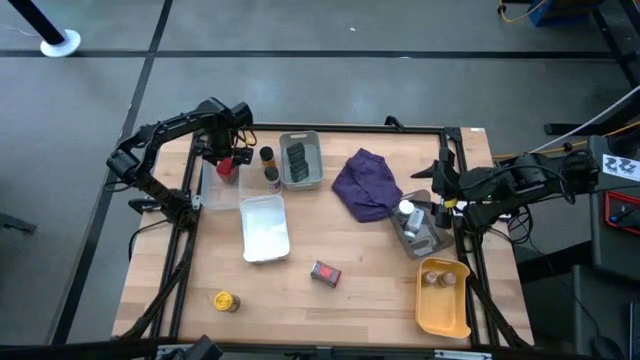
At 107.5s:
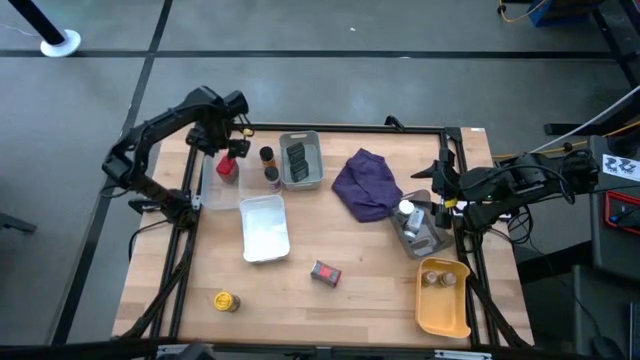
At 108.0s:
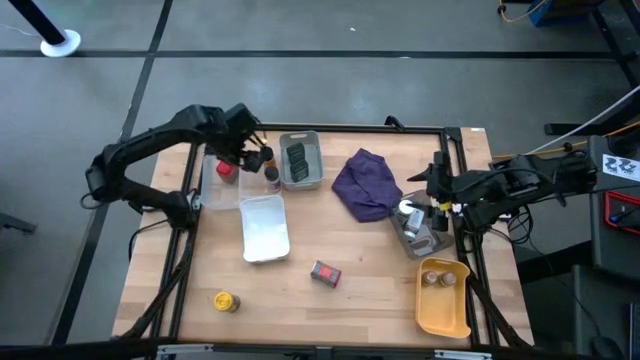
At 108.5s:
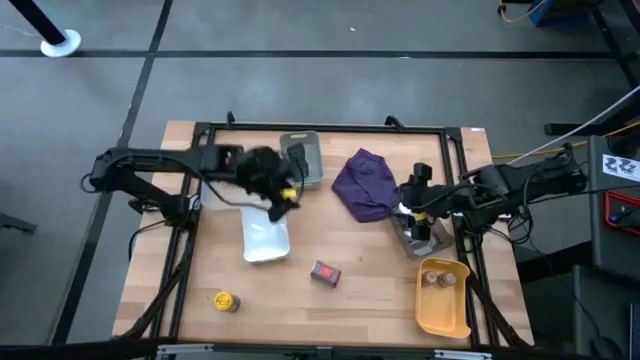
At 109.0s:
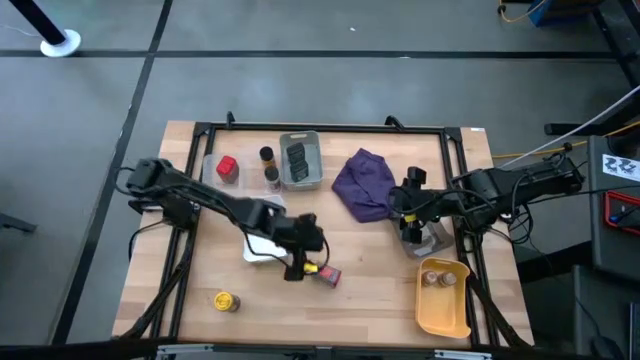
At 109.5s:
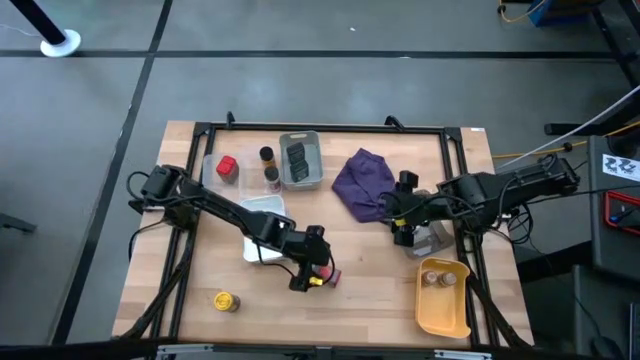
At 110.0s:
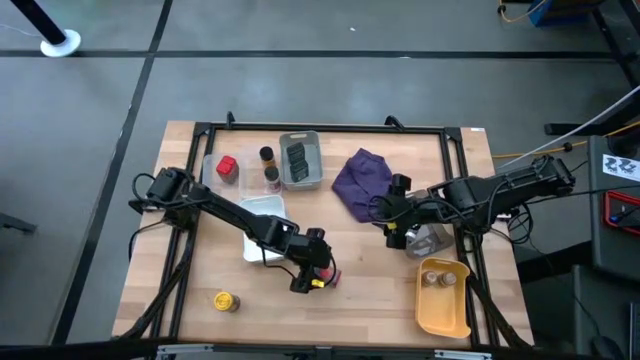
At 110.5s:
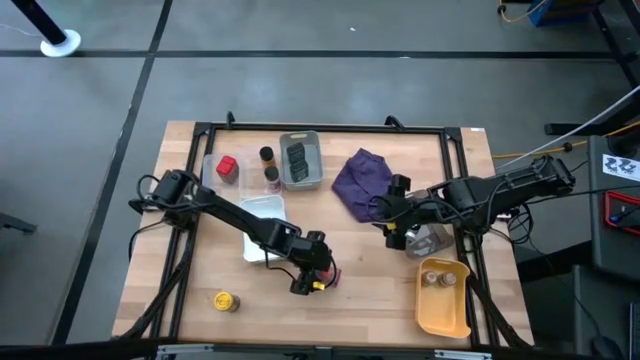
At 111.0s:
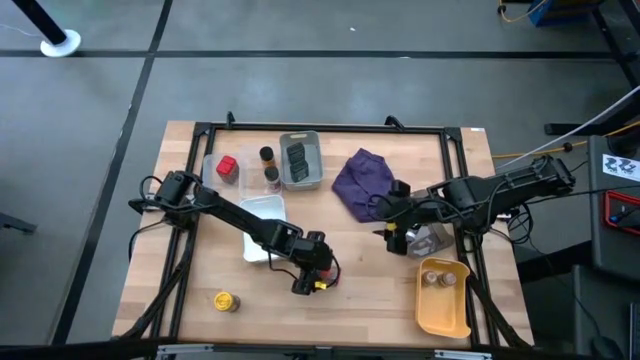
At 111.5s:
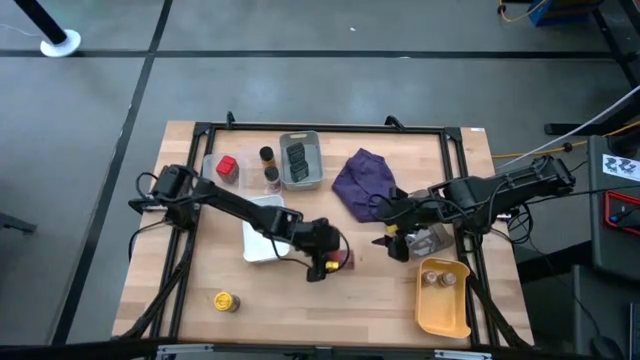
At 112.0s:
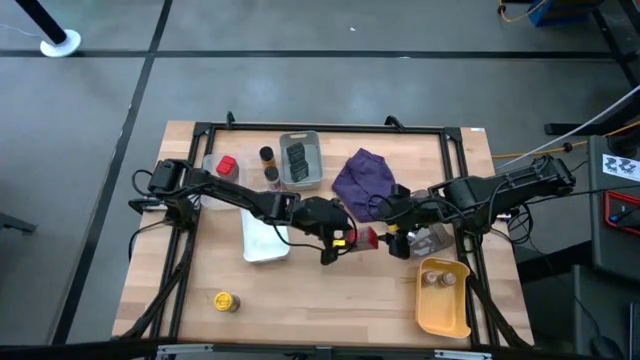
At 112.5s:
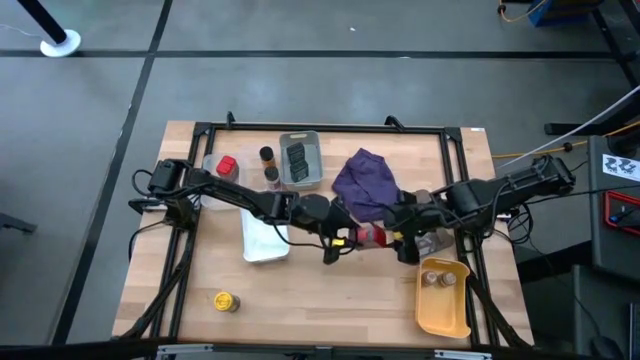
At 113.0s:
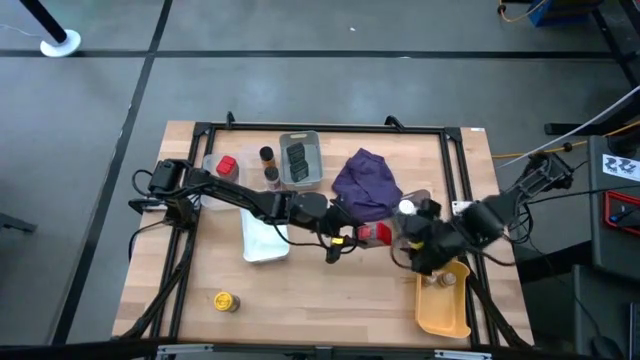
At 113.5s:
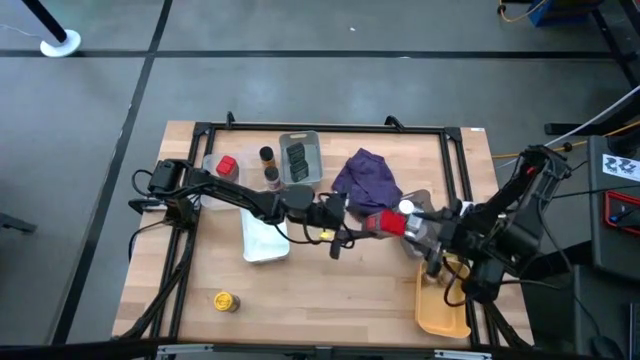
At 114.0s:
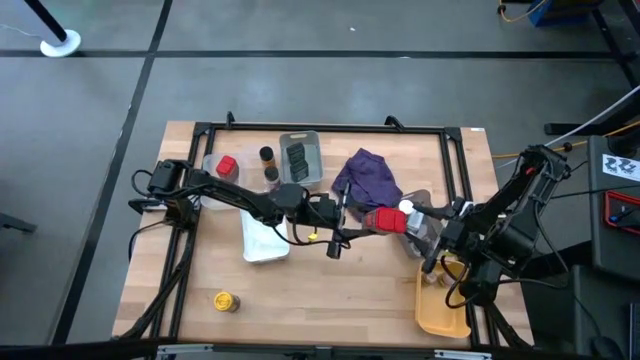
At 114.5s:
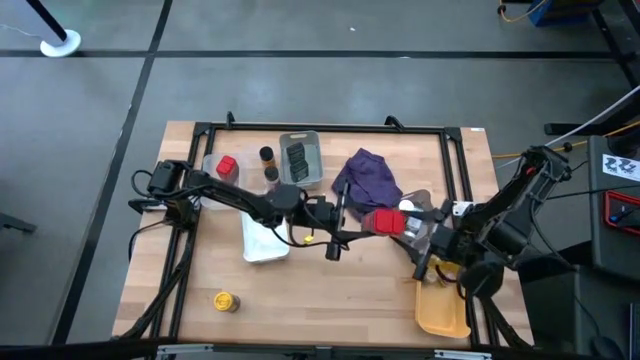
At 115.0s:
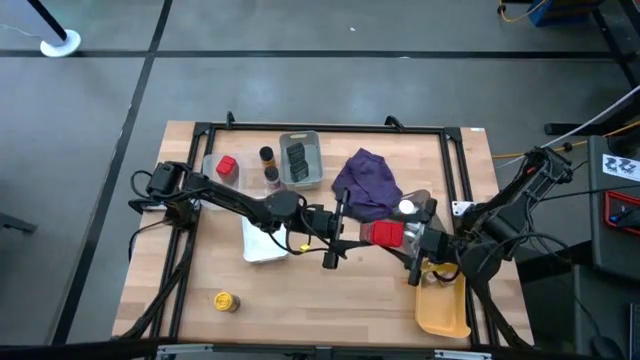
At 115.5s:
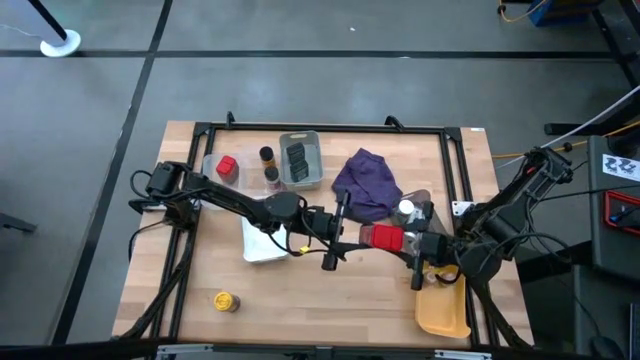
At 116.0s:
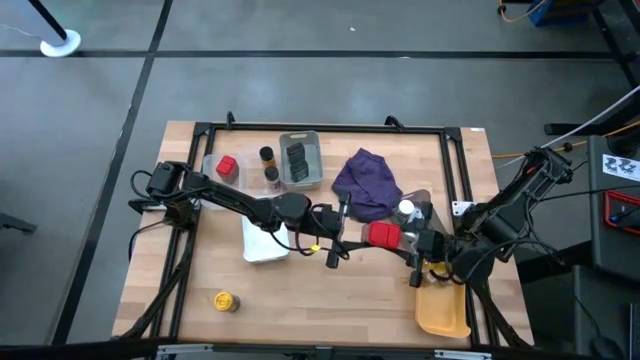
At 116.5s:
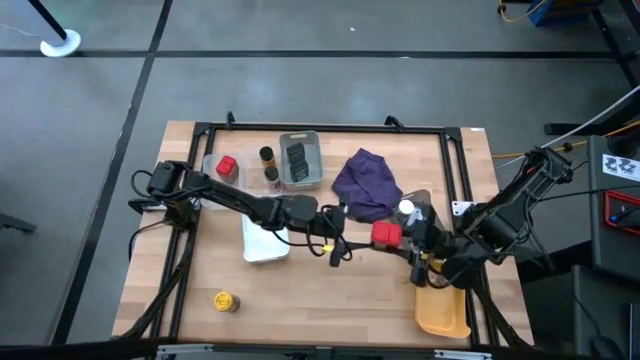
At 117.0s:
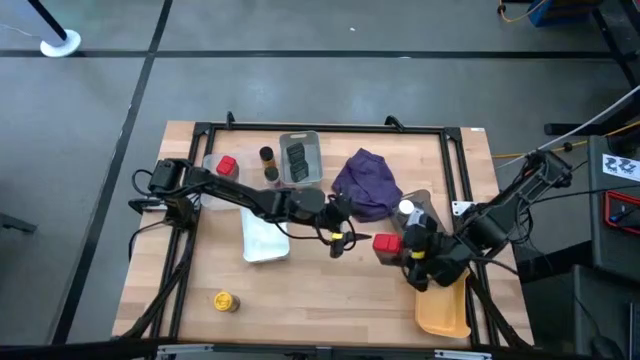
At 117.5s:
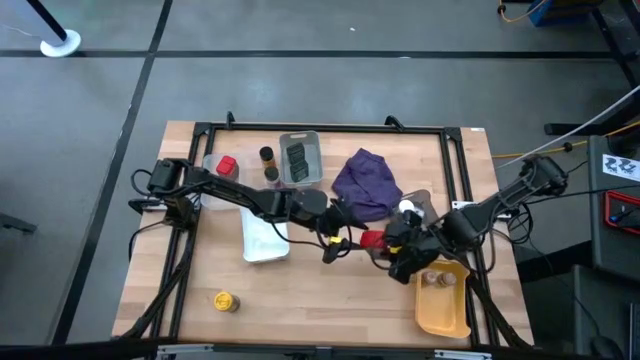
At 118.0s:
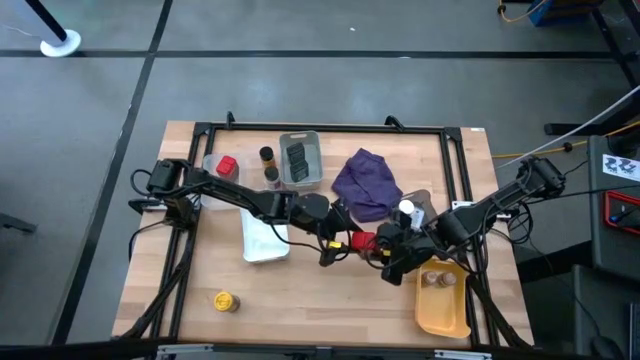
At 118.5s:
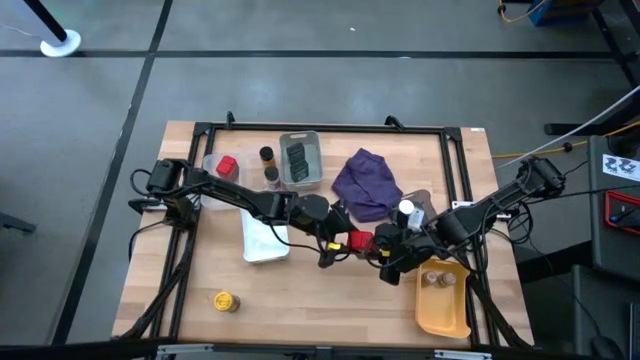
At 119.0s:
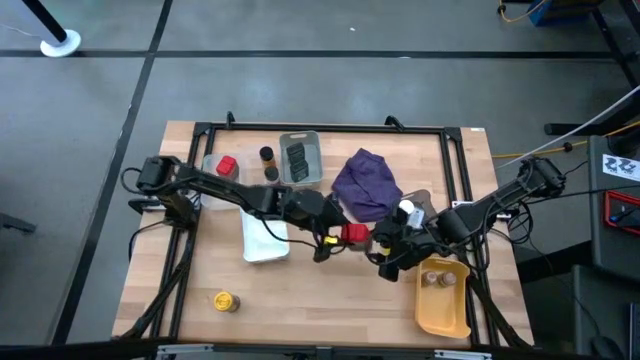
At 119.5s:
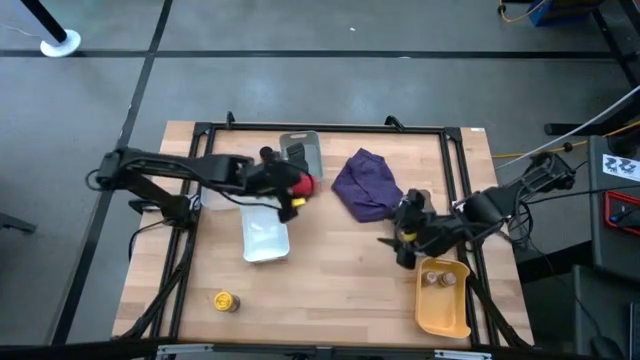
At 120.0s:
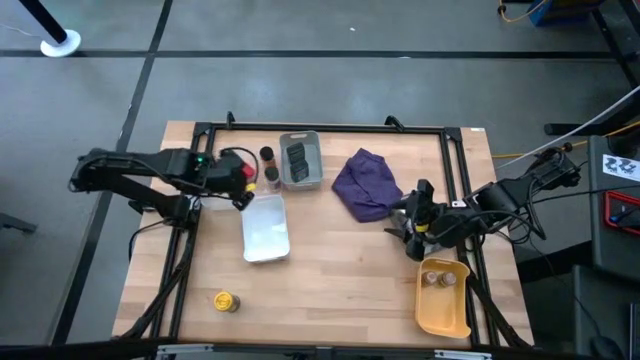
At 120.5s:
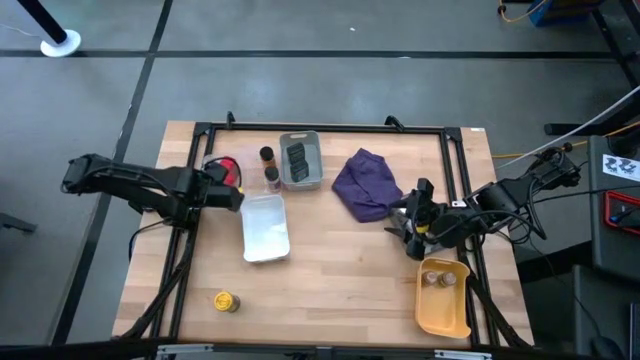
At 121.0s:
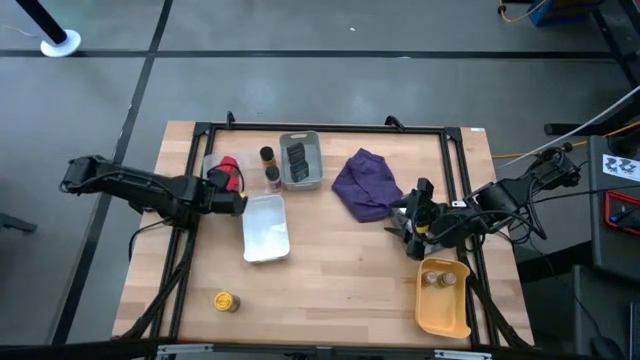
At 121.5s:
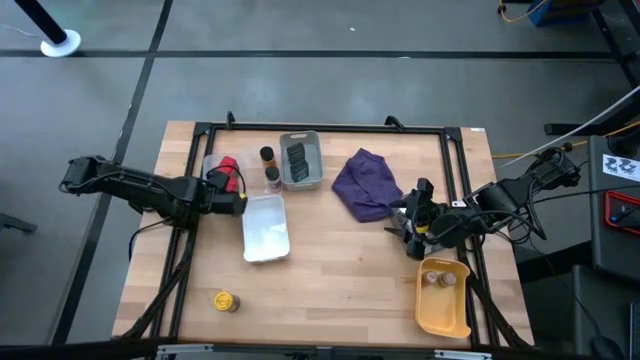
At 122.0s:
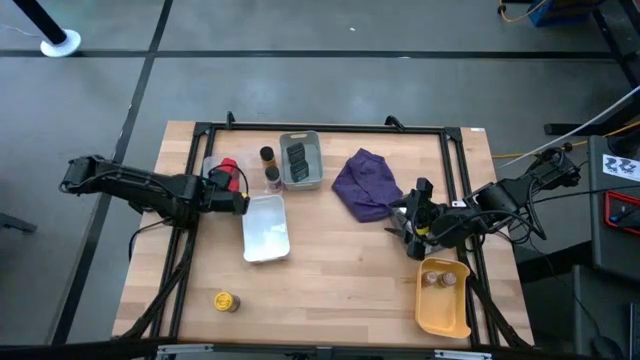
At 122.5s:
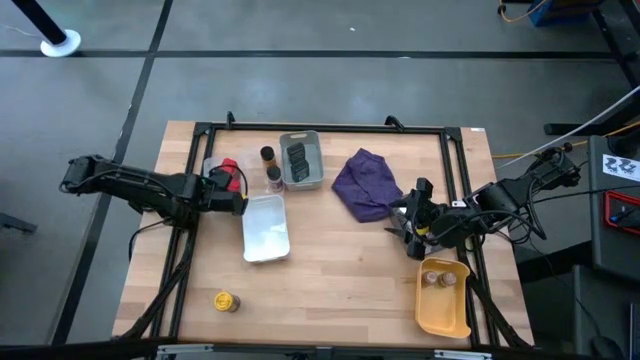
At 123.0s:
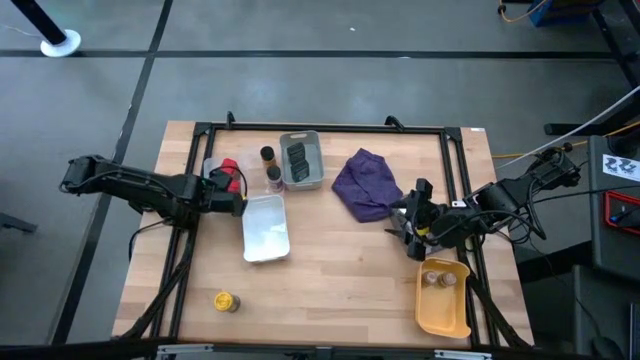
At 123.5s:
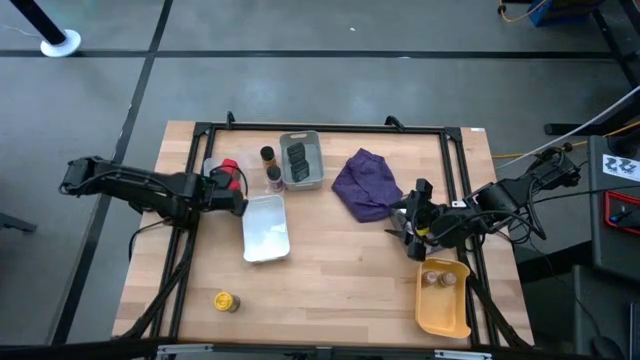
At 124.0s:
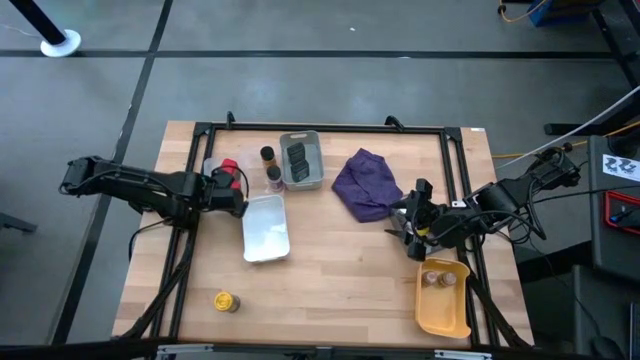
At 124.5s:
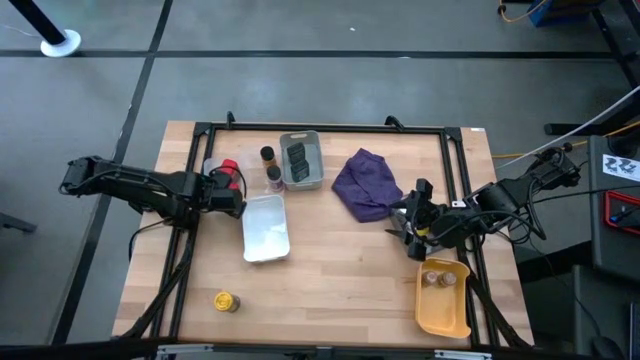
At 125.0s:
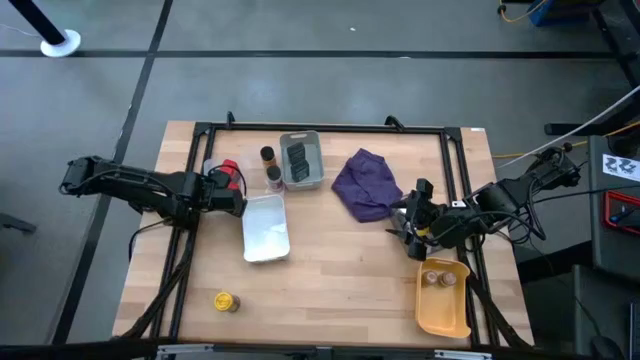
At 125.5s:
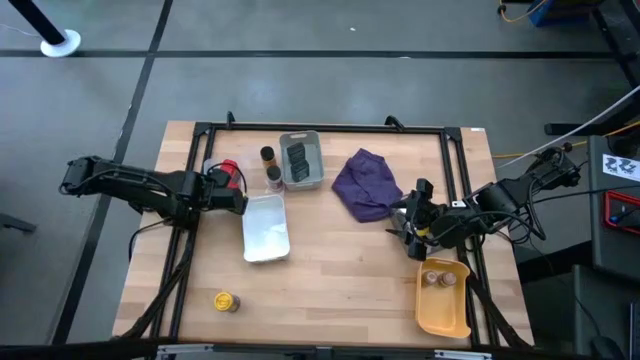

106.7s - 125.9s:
Task: Sort spices by type
Put the red seasoning can into the transparent bin

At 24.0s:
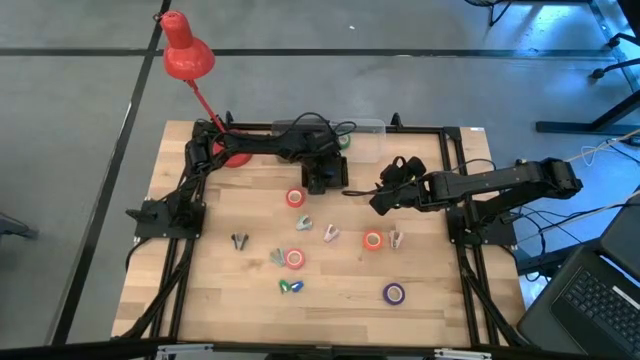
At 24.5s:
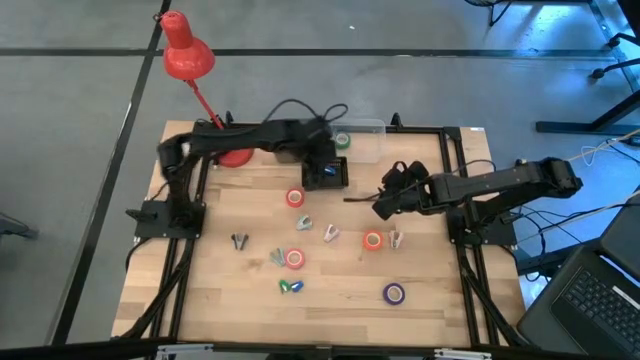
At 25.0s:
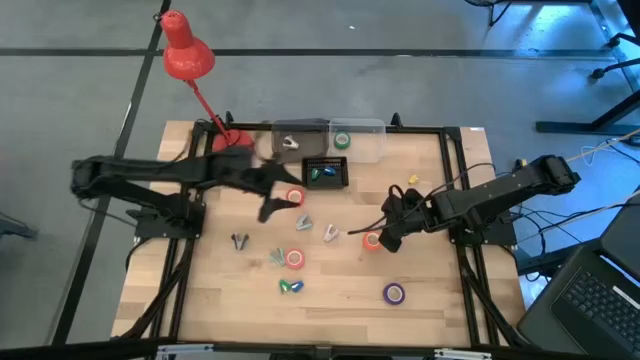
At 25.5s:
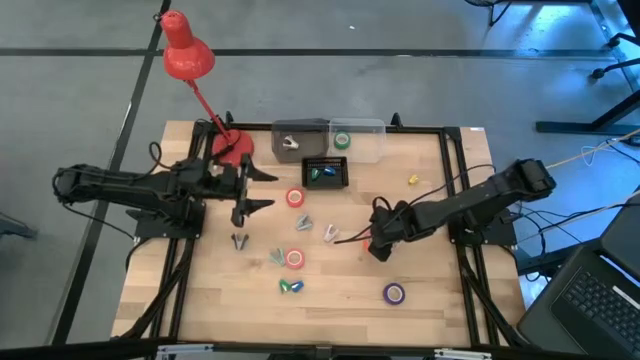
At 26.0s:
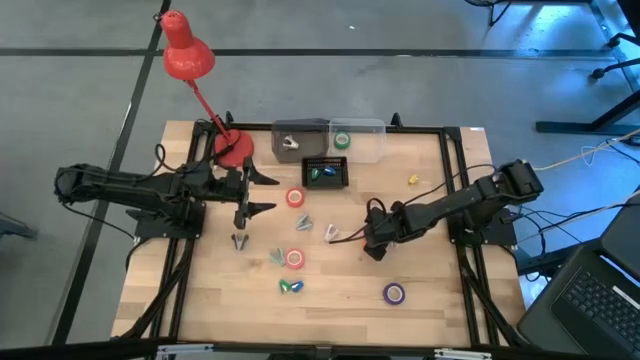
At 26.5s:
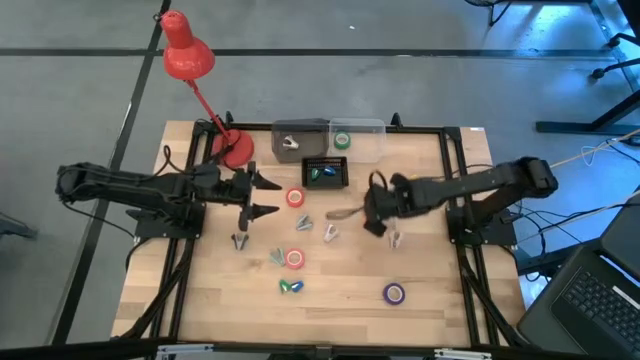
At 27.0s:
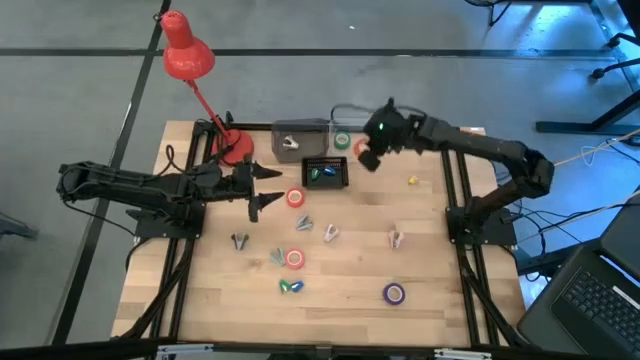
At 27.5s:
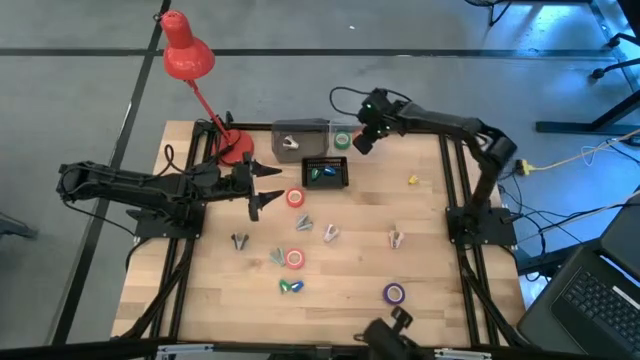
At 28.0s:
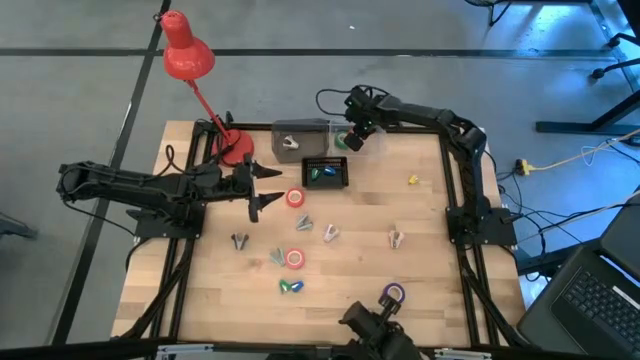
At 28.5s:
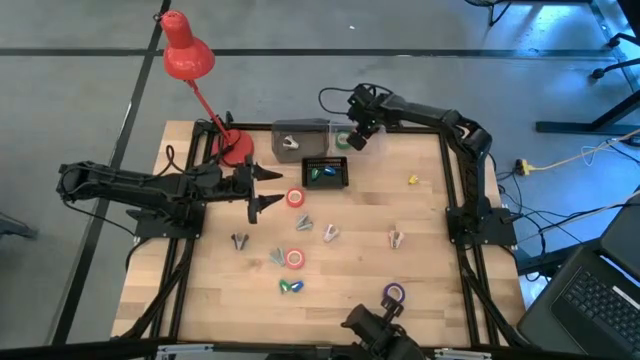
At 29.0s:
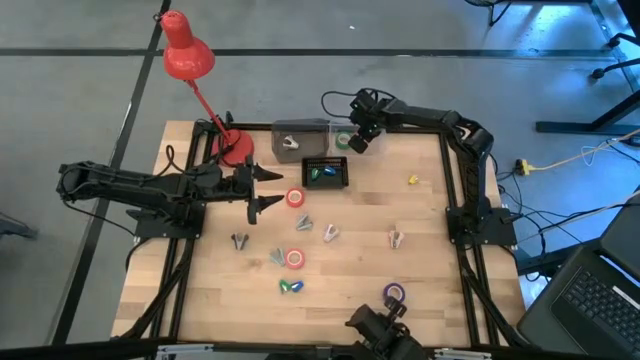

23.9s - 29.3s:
Task: Pick and place Stapler, Stapler remover, tape
Put the orange tape into the transparent bin
